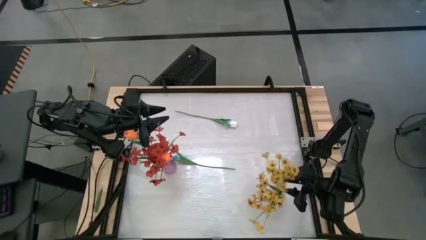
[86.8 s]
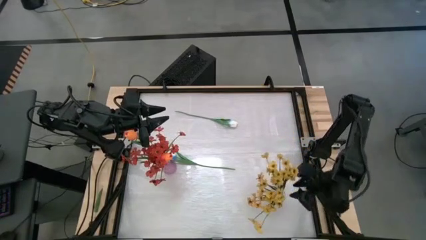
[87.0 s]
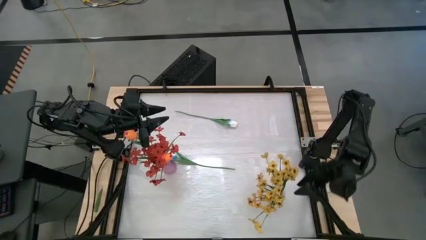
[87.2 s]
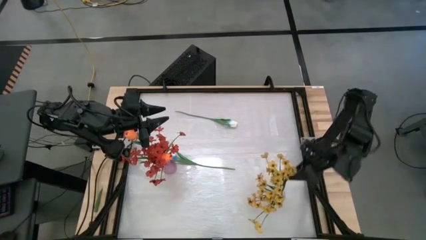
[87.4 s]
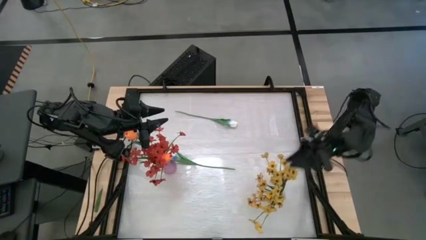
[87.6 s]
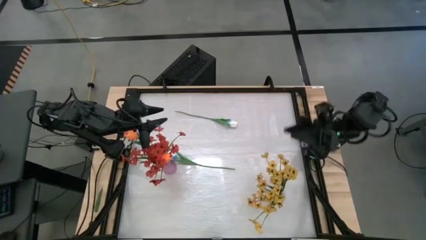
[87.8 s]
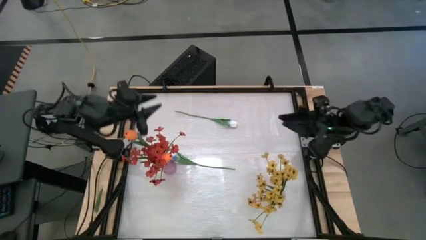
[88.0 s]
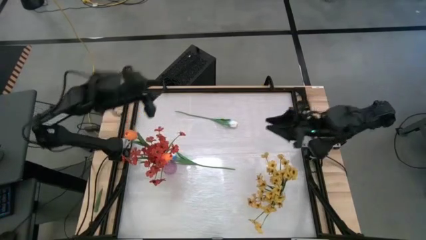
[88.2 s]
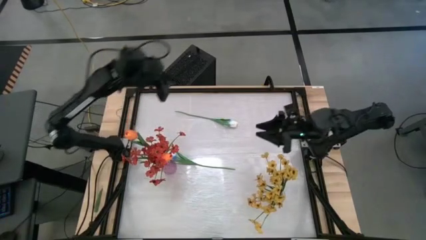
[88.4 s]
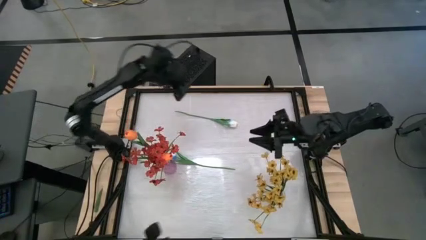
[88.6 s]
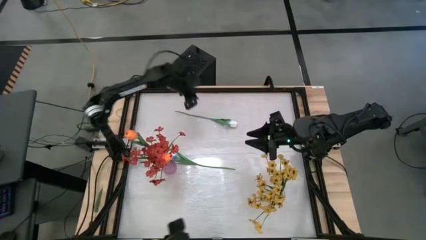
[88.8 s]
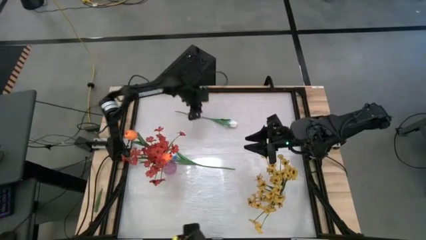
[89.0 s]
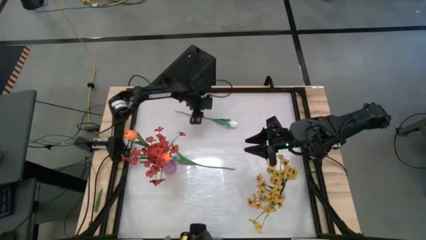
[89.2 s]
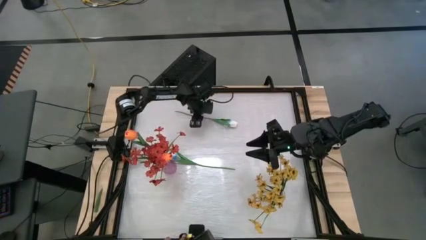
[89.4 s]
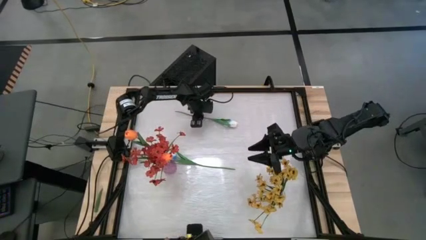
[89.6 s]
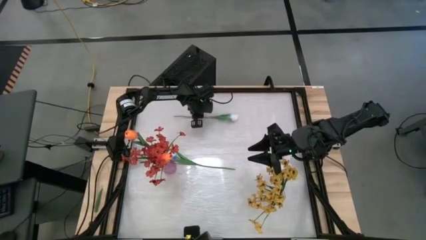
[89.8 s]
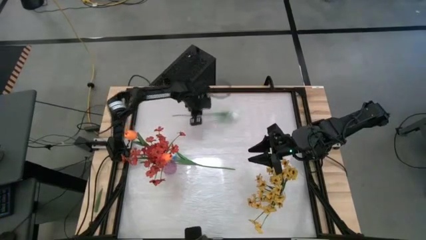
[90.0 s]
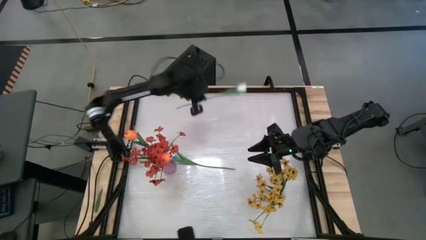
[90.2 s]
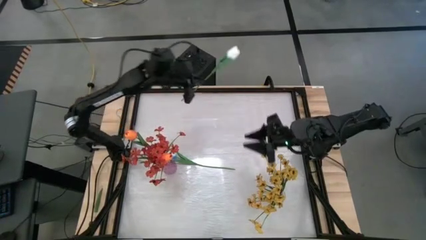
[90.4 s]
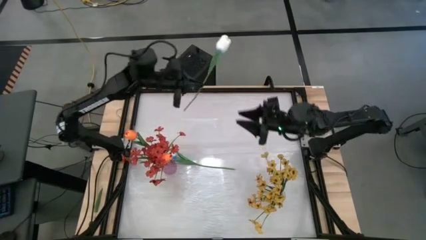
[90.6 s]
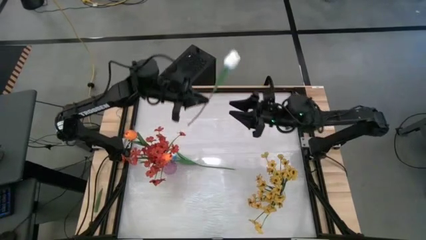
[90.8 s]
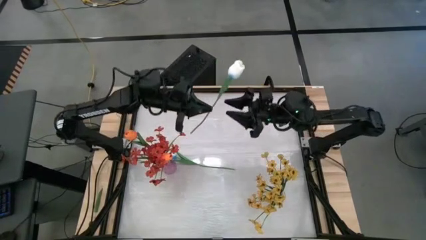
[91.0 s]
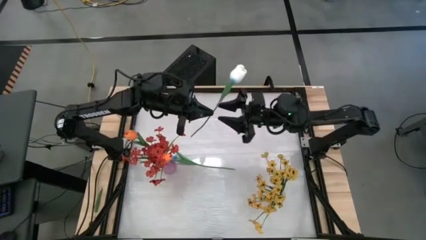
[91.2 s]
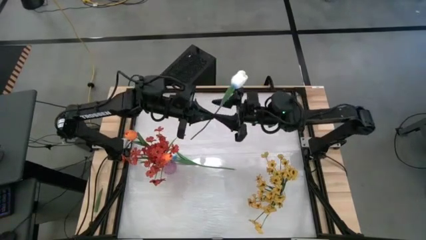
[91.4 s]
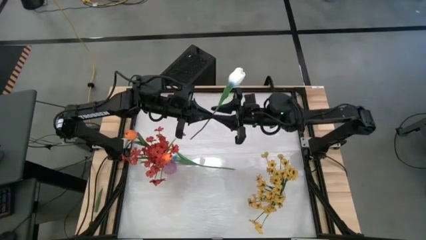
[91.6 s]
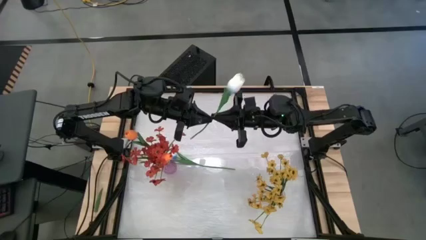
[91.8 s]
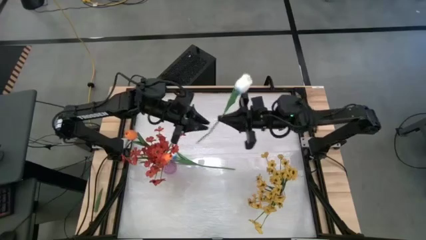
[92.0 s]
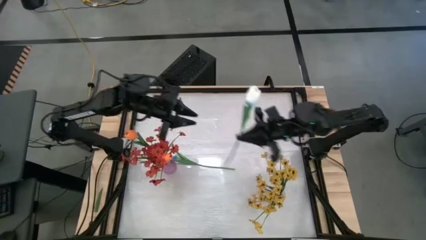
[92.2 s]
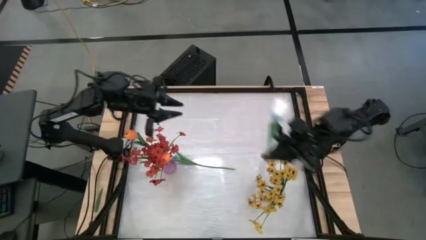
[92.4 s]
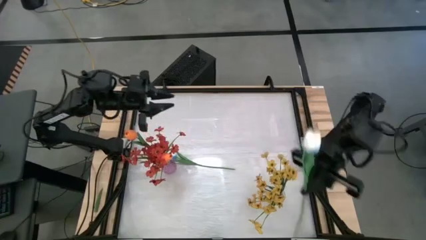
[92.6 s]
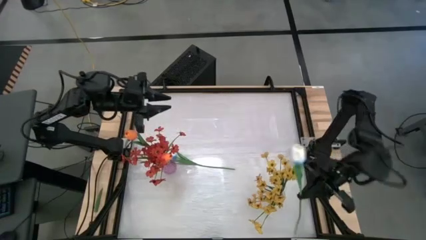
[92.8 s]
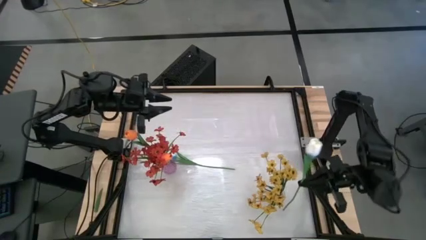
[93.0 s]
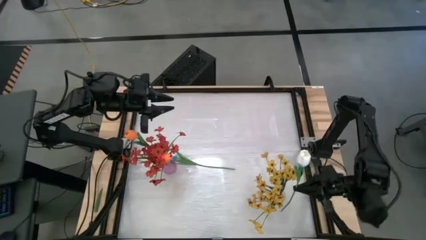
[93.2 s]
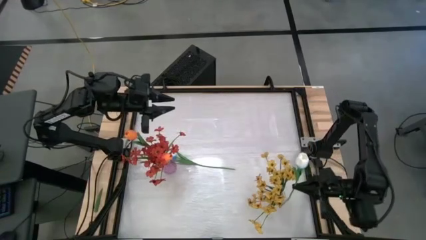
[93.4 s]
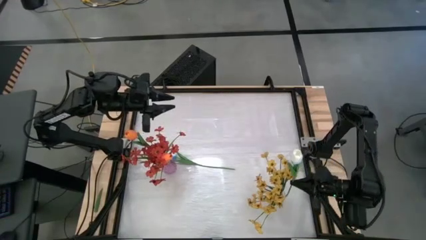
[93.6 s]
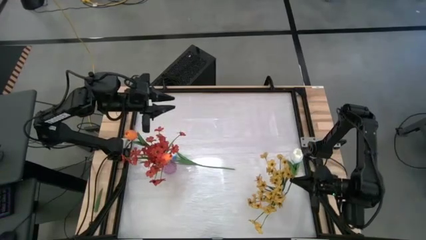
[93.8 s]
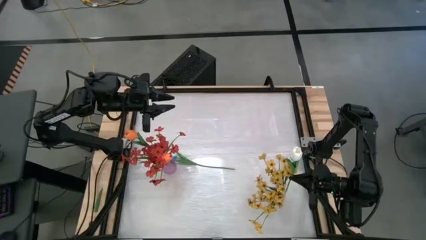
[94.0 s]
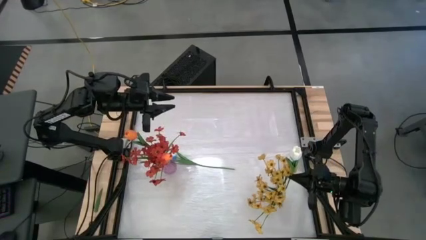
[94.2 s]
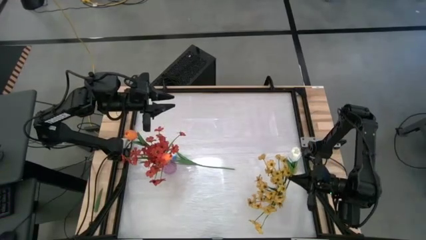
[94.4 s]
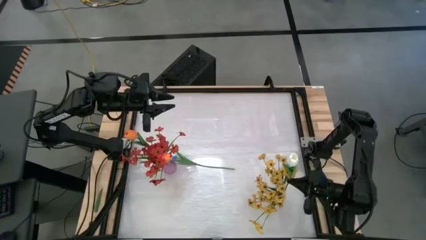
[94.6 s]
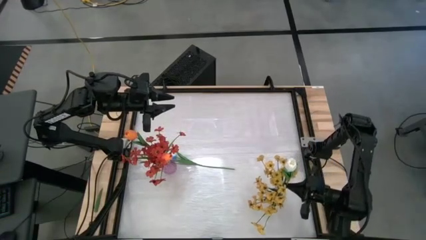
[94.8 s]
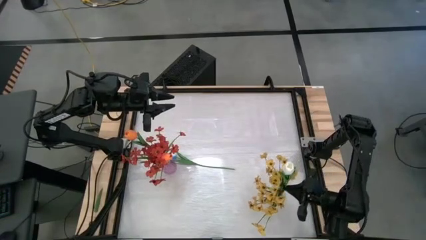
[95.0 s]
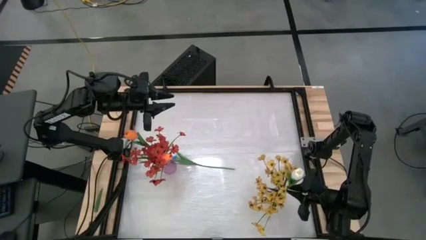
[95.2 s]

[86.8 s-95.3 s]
Task: Sort flowers into vase by color
Put the top white flower into the transparent vase

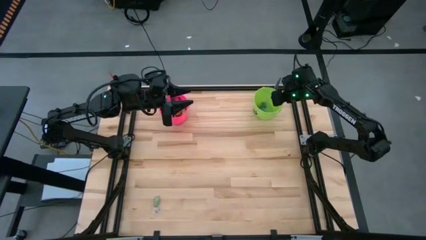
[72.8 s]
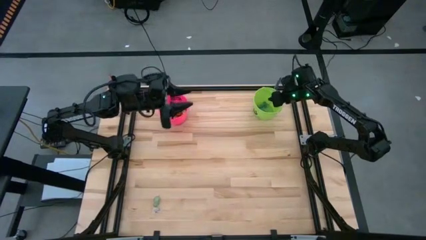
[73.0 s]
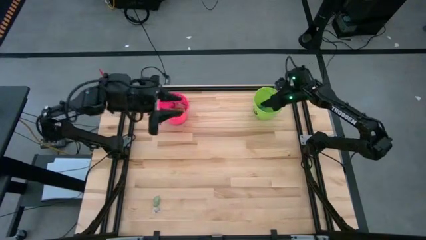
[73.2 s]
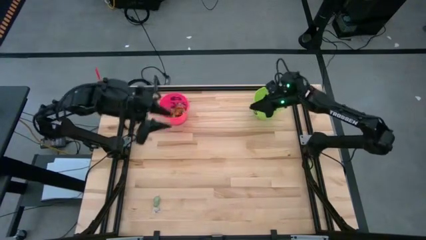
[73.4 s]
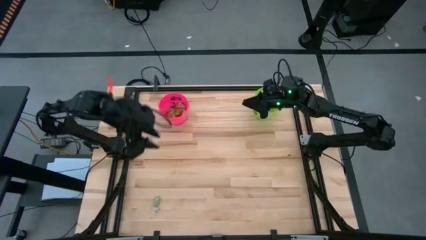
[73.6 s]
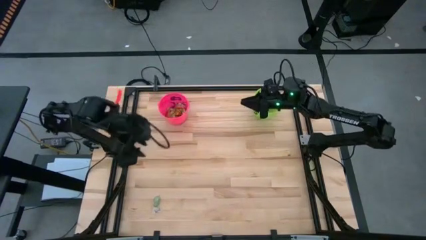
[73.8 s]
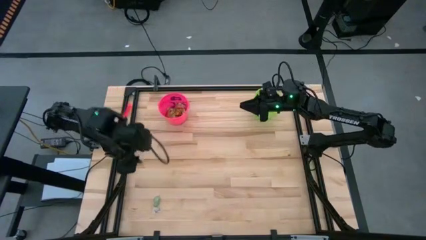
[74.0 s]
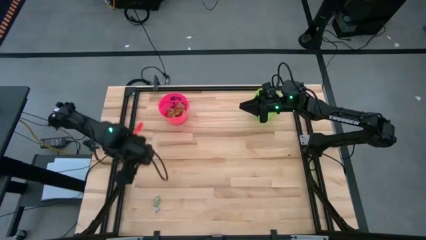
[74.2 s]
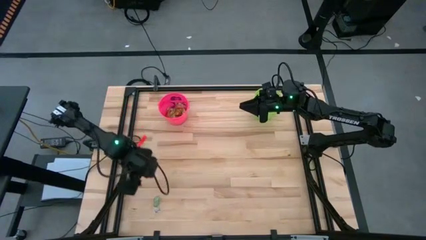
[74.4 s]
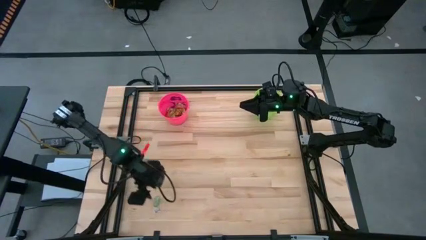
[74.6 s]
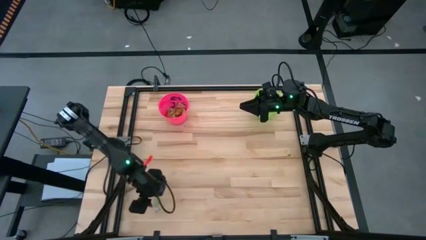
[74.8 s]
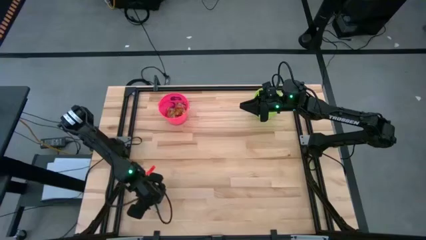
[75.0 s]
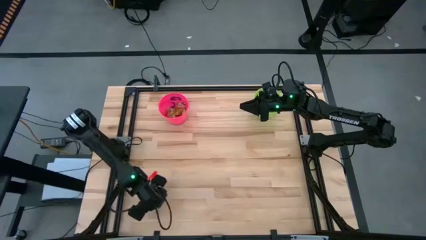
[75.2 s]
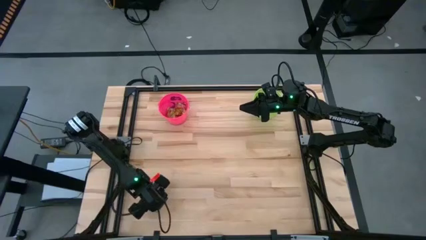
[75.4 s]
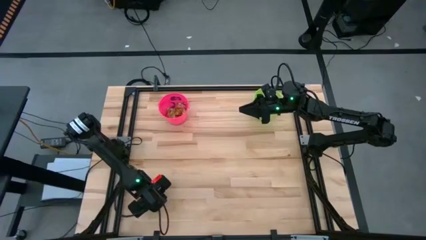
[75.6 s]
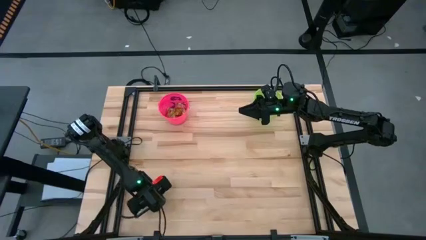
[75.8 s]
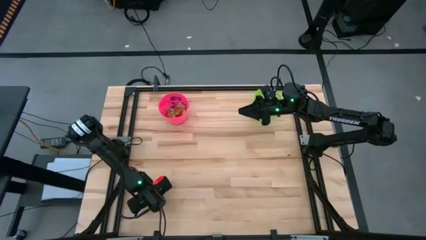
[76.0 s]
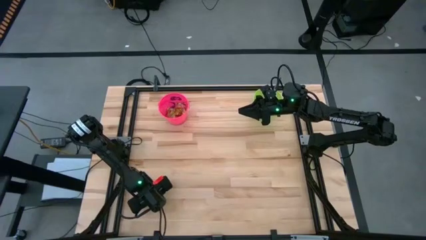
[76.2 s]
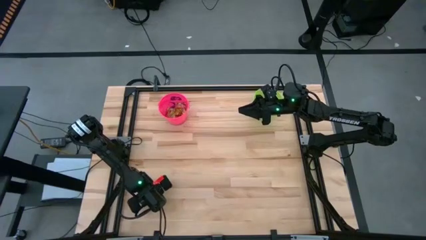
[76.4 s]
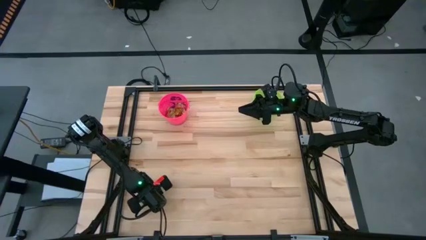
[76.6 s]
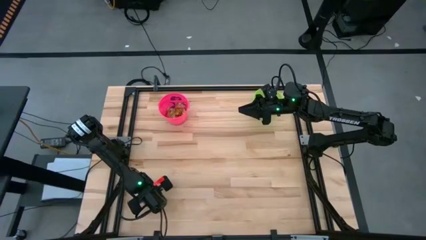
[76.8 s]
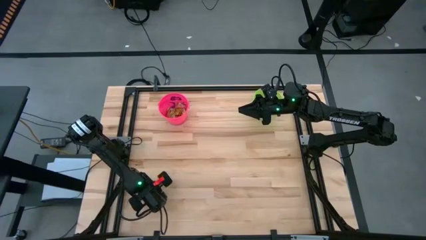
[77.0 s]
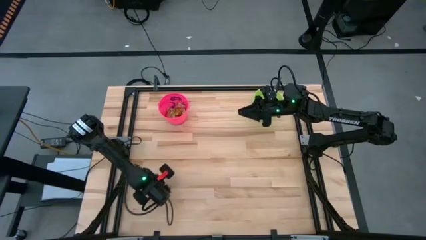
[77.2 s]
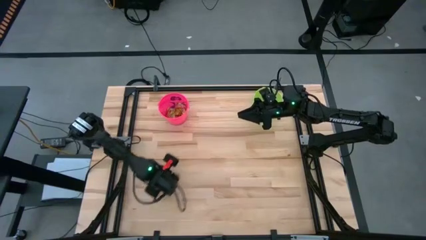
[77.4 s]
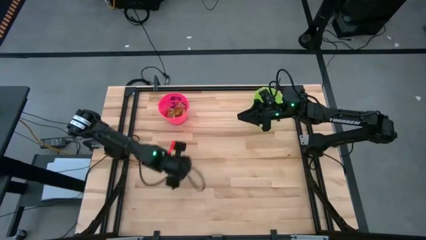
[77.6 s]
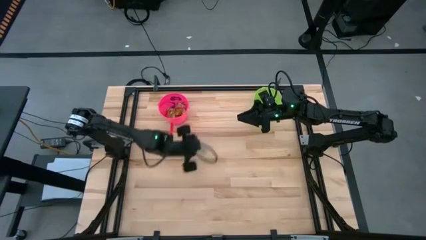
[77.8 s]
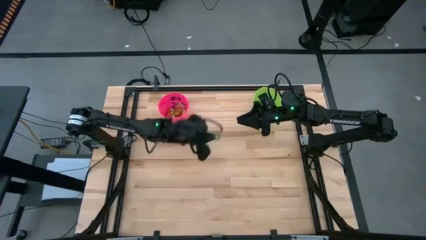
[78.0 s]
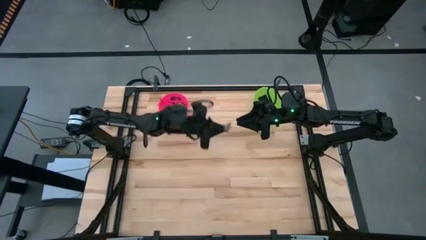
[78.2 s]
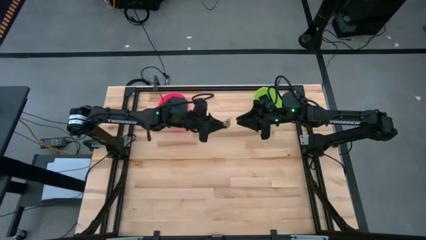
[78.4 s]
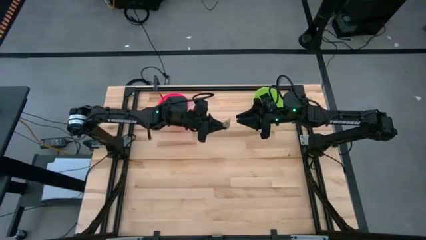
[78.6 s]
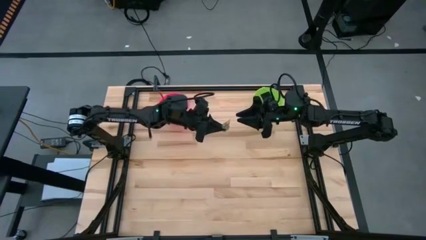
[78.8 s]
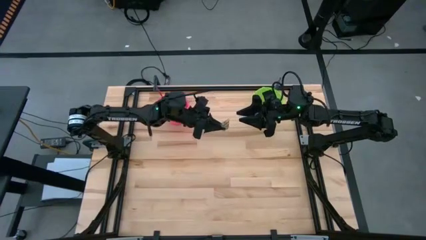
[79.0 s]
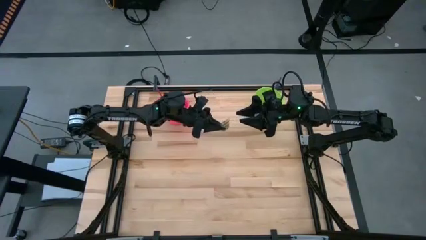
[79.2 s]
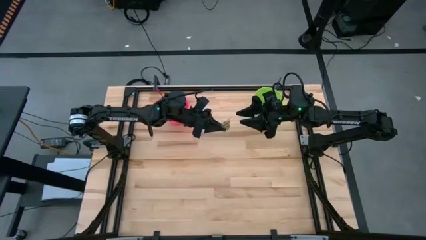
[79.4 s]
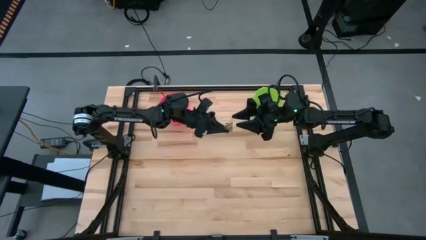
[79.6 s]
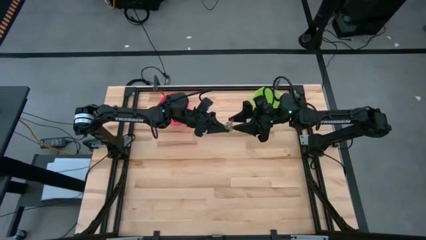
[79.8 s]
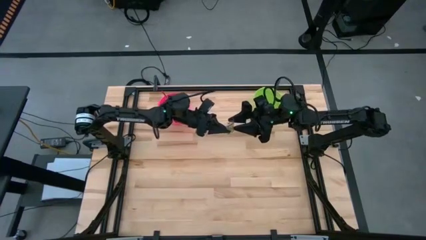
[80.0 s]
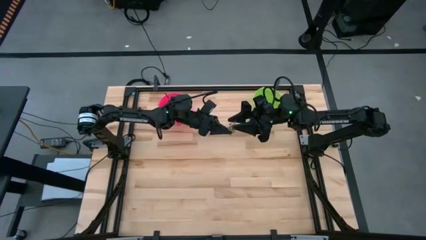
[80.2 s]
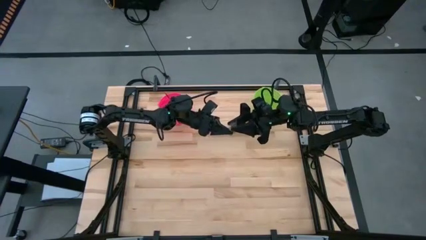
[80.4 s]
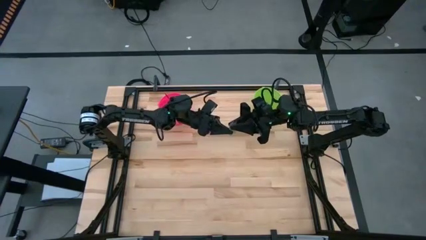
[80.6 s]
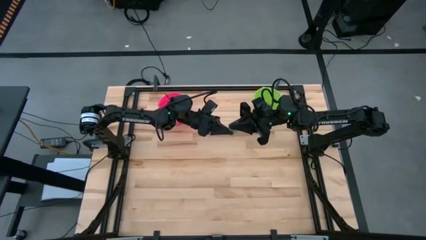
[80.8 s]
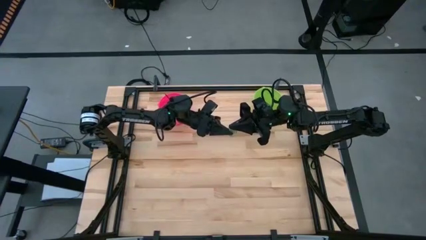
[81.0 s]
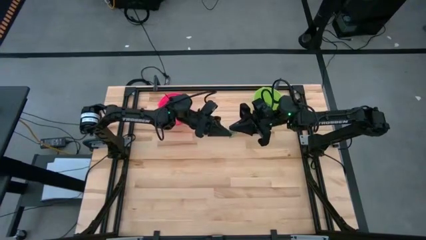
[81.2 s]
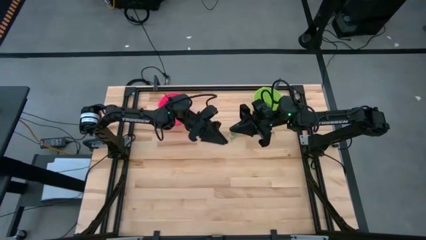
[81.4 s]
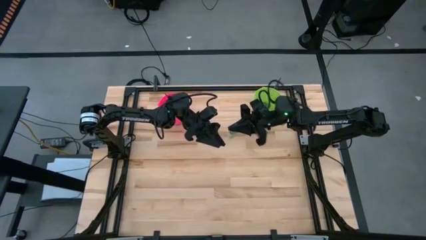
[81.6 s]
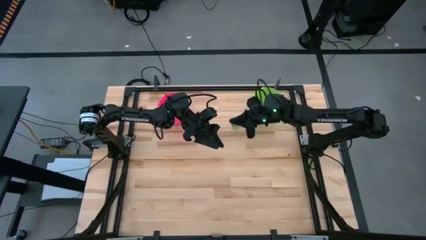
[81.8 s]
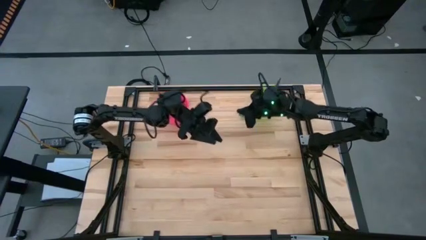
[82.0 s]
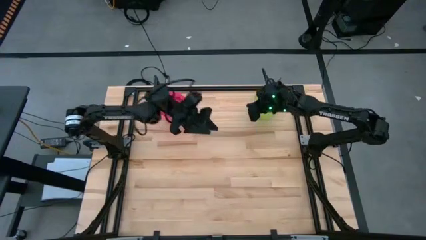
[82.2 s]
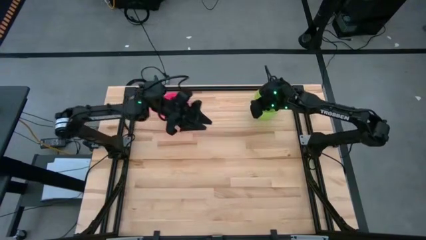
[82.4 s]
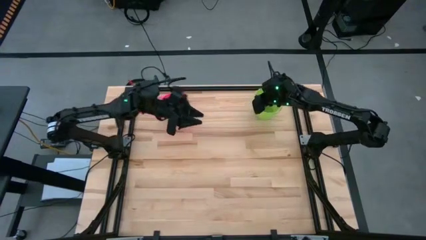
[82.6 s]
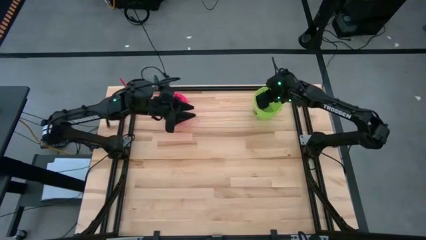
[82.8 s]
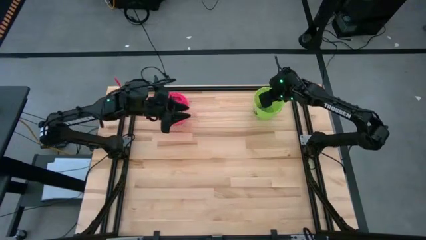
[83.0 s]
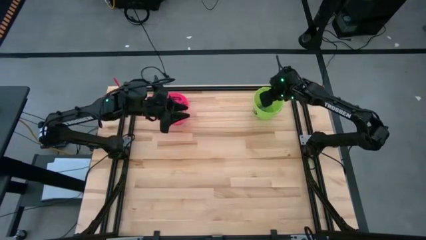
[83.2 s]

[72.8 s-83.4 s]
Task: Sort candy by brand, put in halloween buckets
Put the green candy into the green bucket
